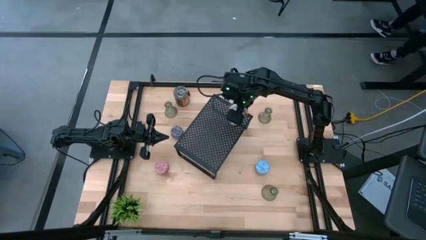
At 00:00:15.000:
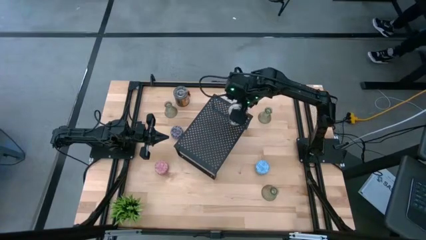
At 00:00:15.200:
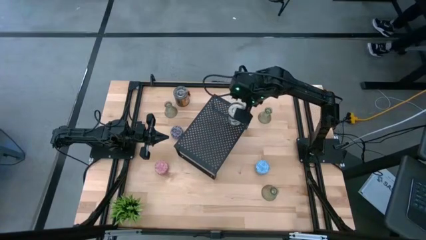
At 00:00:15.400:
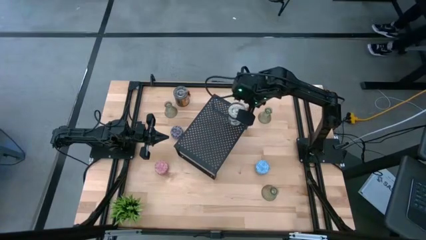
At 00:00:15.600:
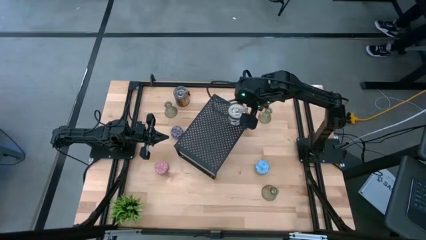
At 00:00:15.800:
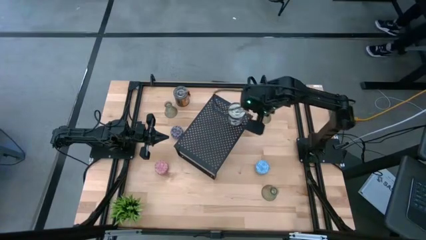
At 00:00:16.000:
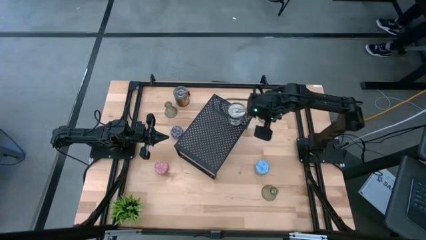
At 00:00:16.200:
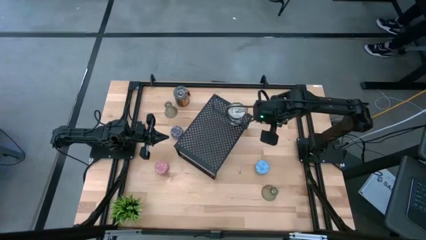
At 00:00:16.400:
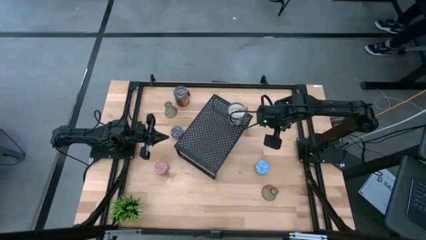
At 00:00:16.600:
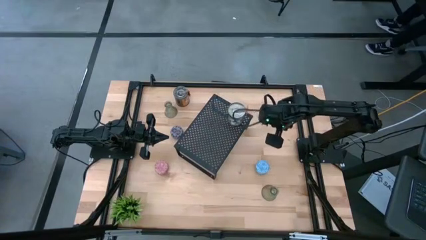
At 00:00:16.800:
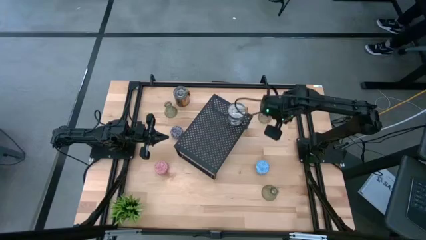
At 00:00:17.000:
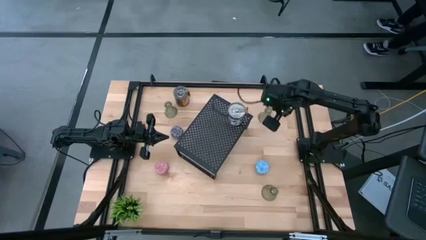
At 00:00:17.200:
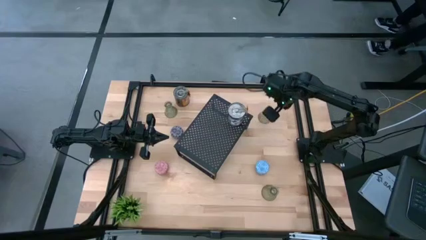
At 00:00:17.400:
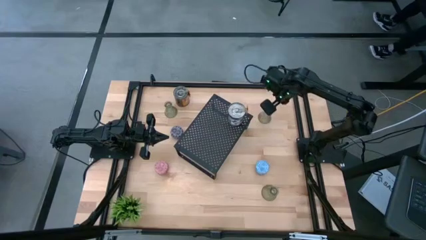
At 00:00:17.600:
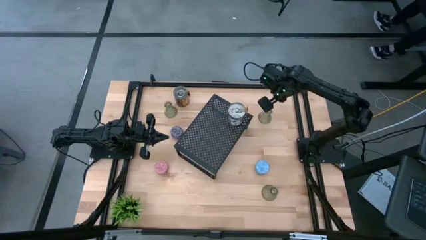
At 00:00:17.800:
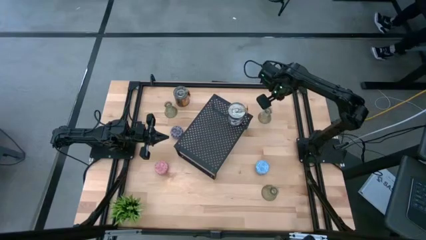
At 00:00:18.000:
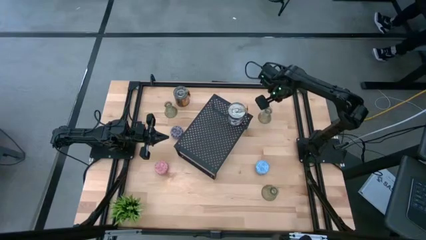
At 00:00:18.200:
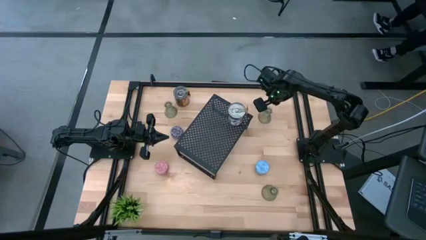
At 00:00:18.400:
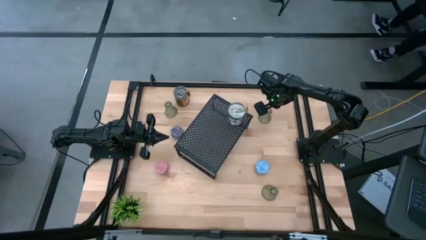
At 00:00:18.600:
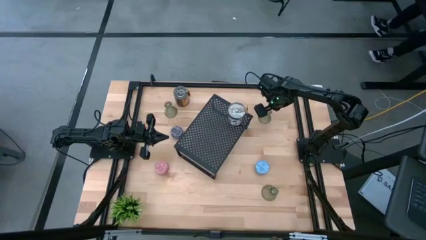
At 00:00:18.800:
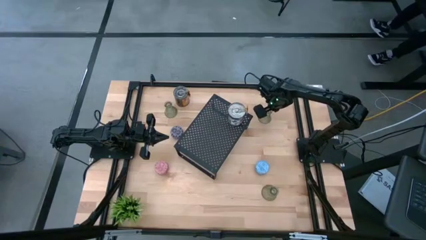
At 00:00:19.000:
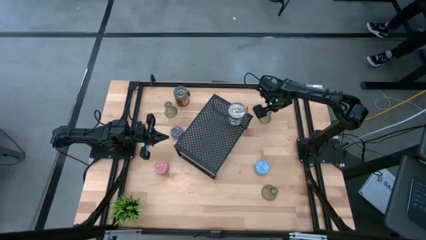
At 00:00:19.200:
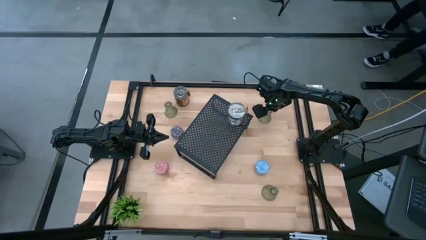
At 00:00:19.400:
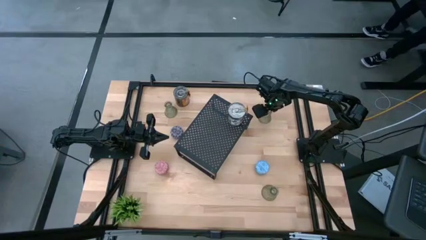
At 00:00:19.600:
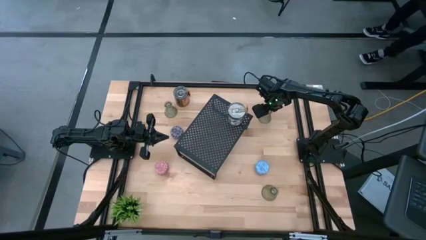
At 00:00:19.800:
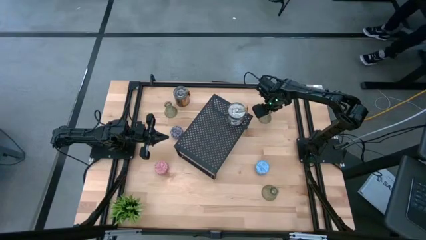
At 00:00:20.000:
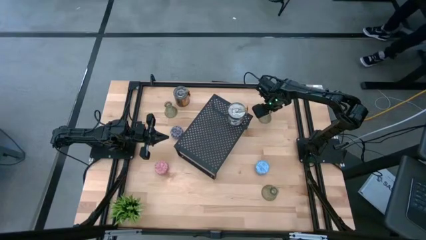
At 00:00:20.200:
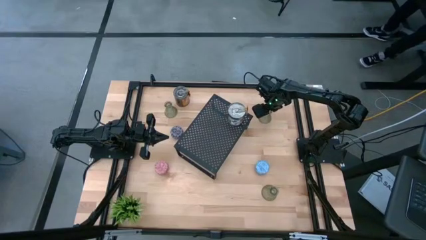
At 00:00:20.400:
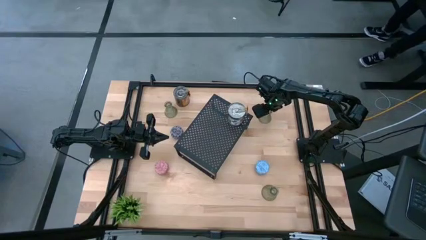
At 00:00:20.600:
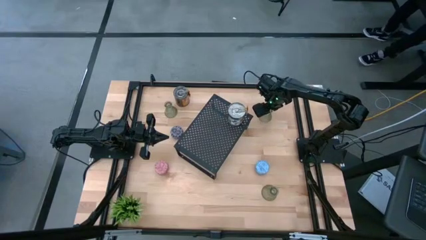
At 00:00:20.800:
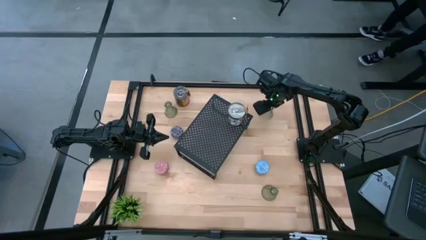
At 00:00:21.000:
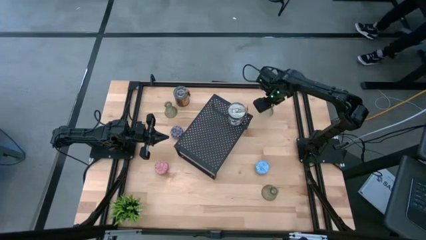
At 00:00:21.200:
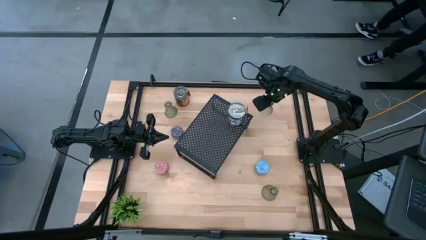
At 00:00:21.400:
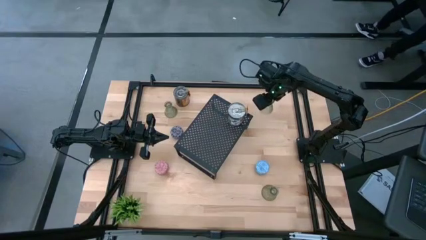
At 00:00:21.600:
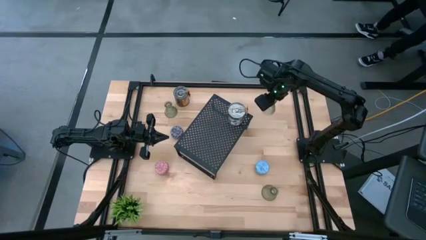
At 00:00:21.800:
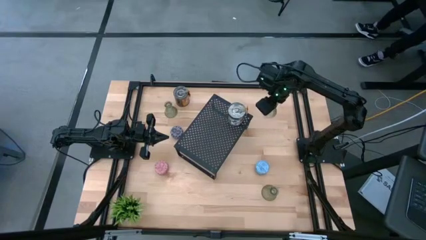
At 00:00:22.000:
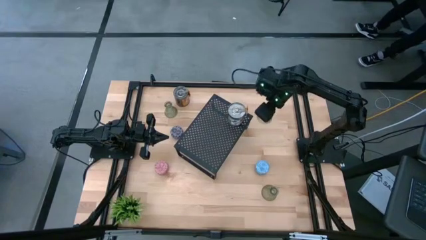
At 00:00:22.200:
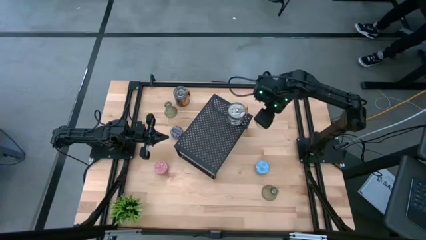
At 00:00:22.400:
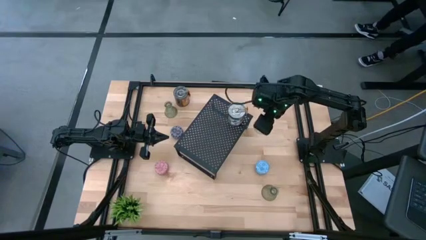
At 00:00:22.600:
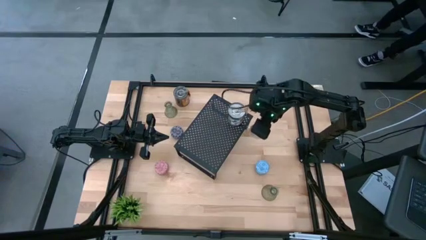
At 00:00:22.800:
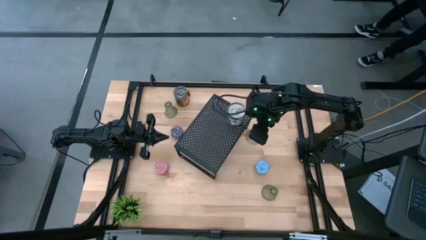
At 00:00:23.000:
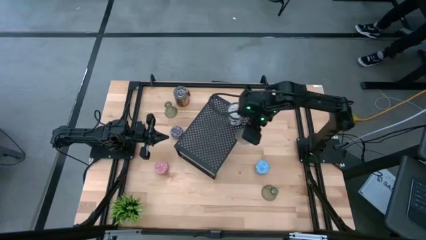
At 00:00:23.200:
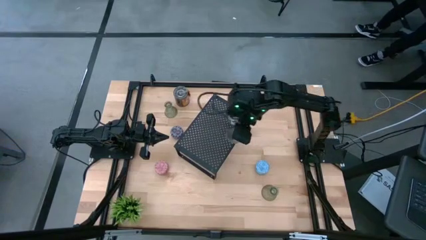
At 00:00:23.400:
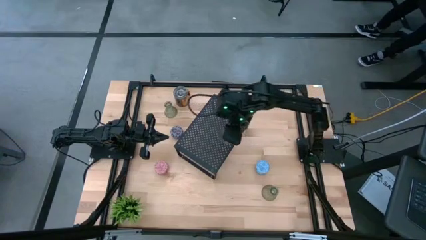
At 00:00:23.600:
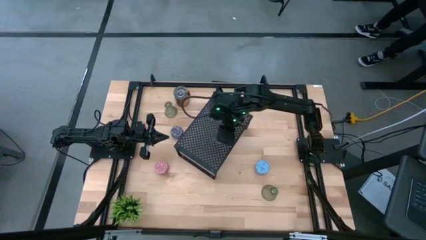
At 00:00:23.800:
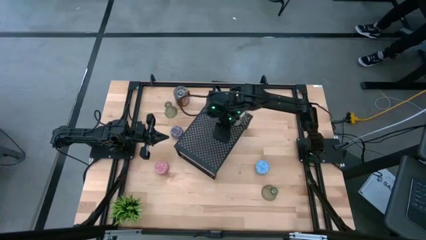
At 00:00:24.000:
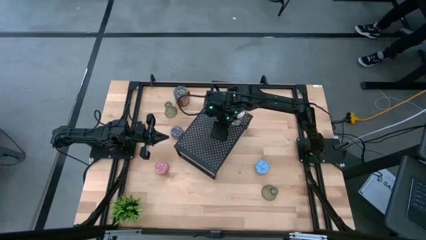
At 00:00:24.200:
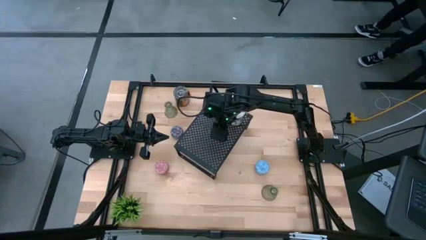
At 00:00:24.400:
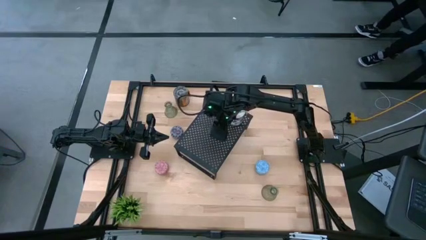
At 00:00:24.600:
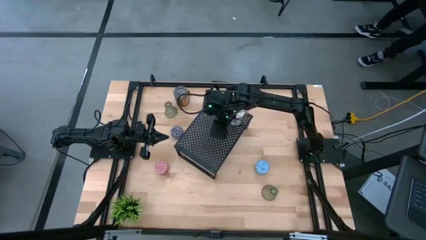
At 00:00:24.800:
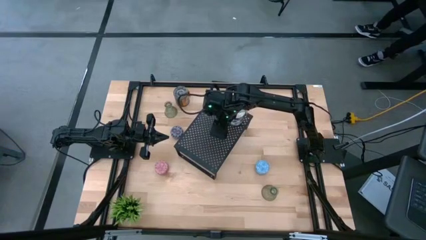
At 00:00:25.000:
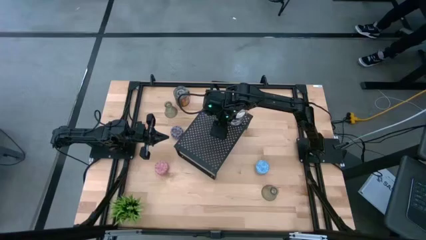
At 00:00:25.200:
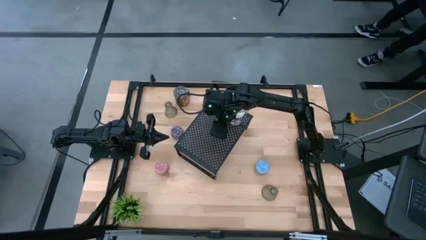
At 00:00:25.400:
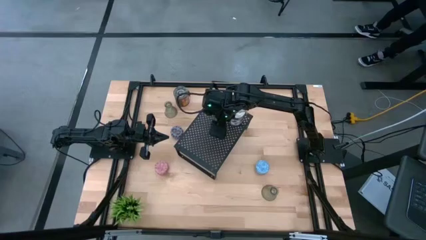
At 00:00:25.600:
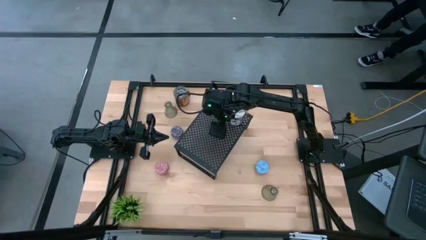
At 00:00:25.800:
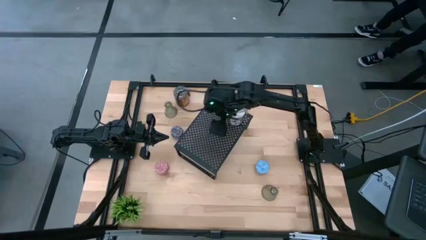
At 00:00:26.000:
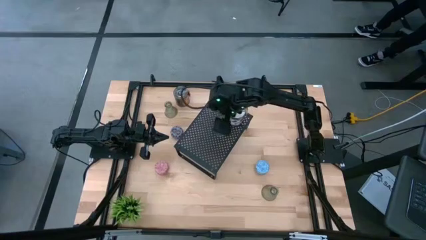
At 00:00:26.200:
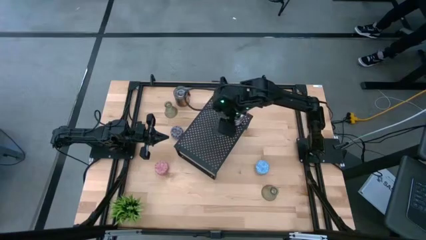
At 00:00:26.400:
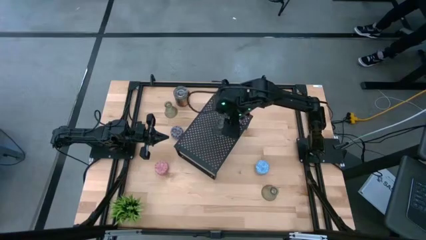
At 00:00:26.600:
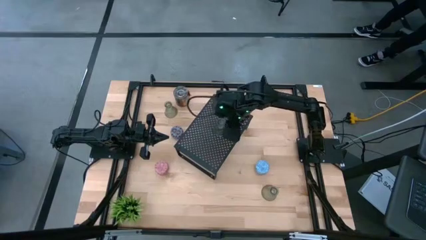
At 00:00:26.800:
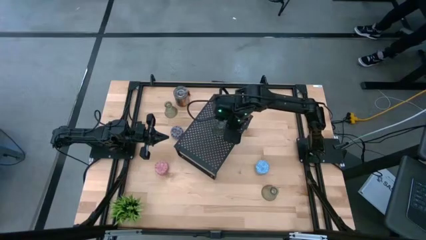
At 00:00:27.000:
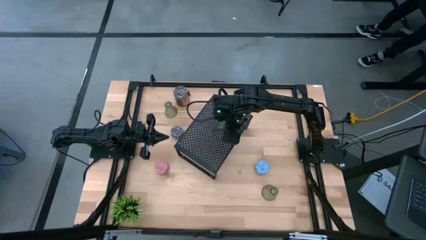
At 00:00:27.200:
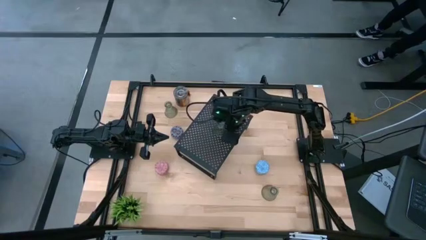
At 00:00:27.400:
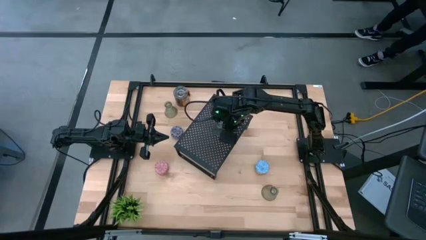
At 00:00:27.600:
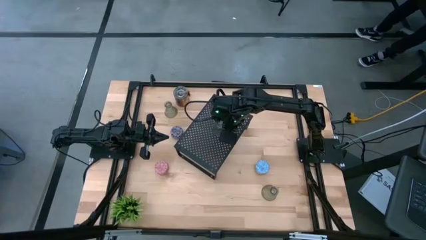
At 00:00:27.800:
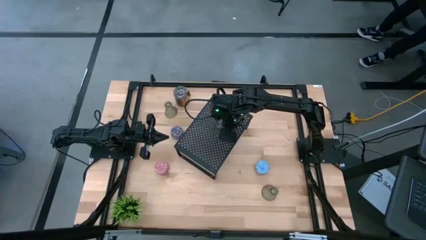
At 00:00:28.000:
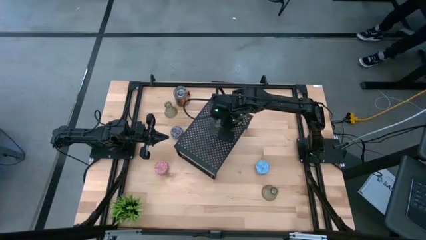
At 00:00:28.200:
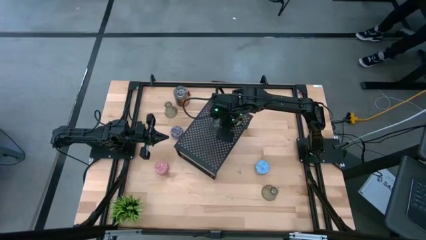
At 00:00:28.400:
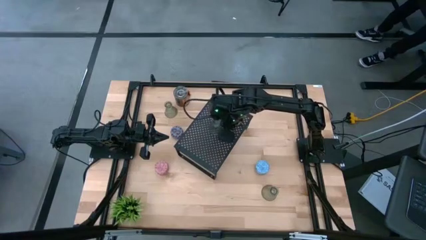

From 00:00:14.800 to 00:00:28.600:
Task: Pick & Place candle stick holders
Put the top right glass candle holder on the shelf

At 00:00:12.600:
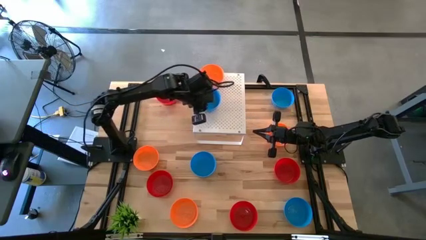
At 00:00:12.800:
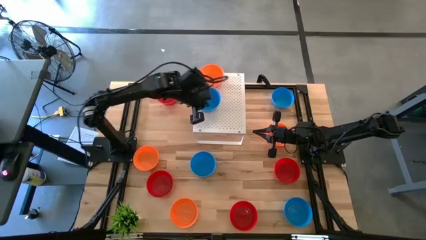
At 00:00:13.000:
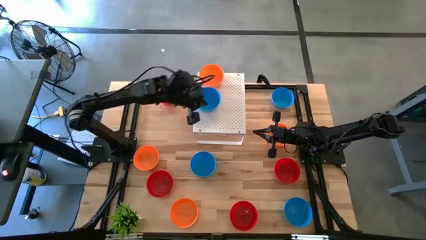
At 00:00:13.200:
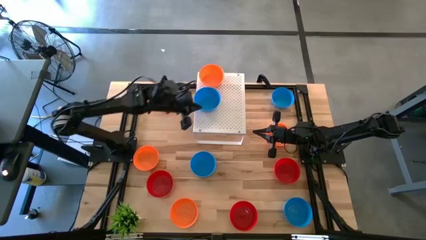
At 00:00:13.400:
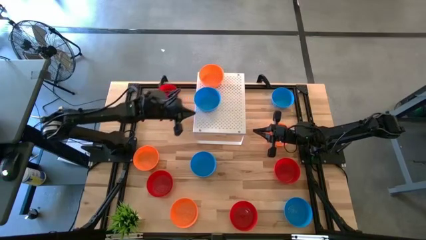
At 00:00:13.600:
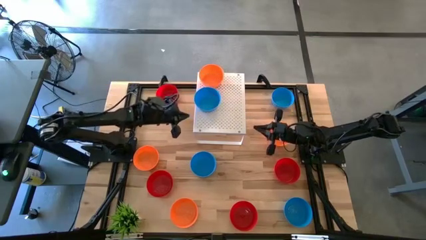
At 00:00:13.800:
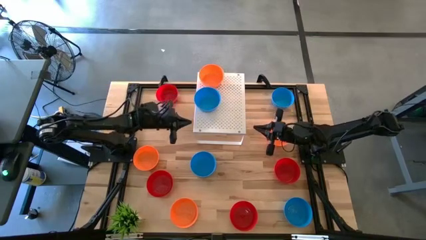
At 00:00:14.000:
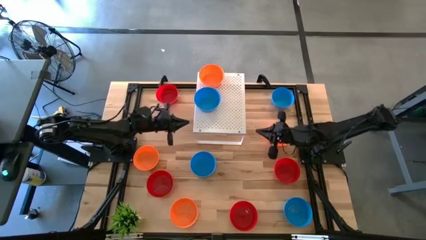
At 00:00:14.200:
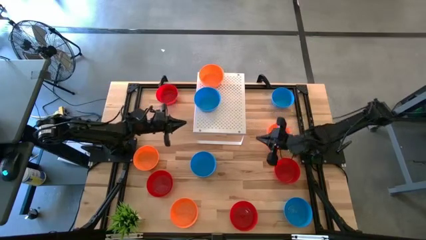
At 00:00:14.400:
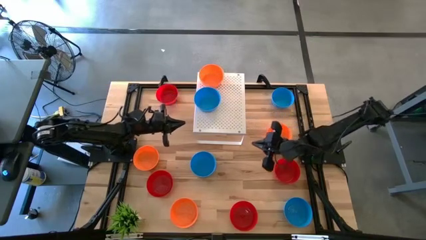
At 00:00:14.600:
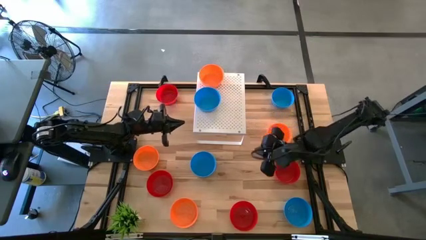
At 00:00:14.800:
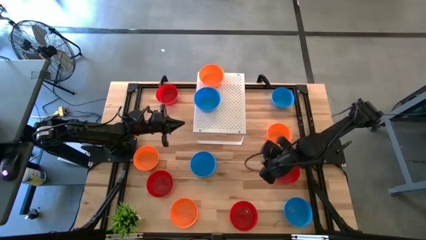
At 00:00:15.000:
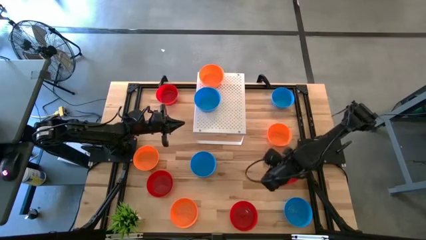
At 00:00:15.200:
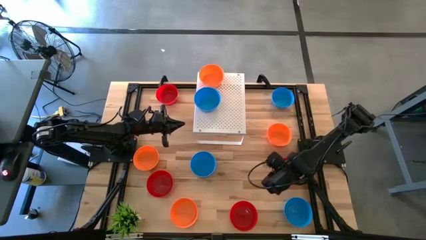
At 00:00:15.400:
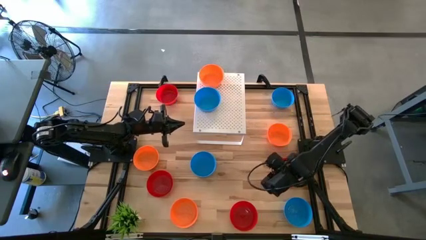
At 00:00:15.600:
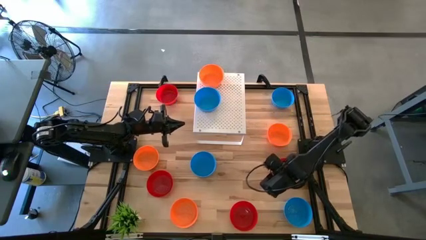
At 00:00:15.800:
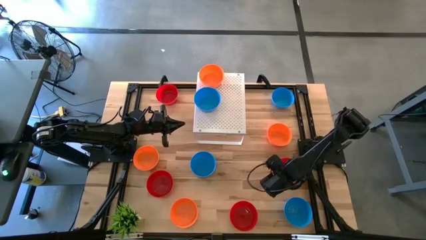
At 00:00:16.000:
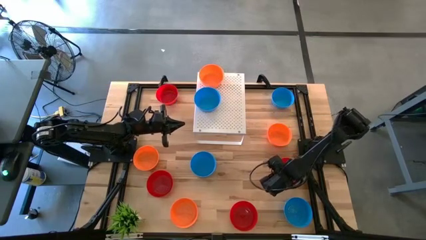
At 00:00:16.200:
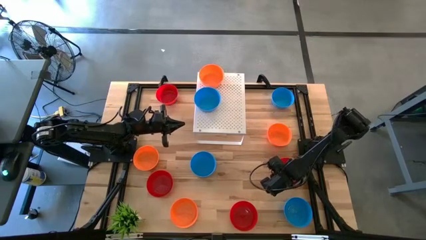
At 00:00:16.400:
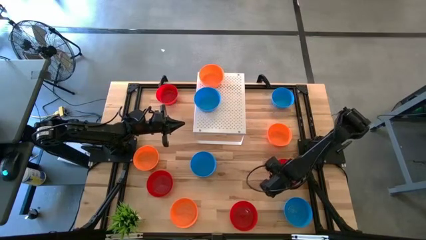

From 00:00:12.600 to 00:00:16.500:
Task: Pick & Place Mini bowls
Put the red bowl on the shelf
